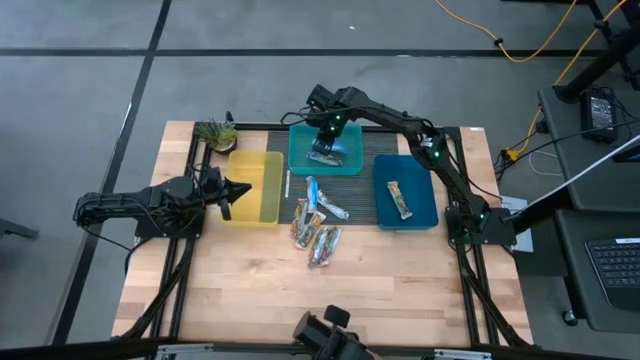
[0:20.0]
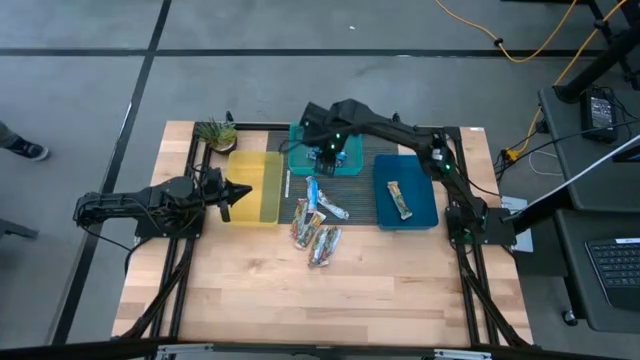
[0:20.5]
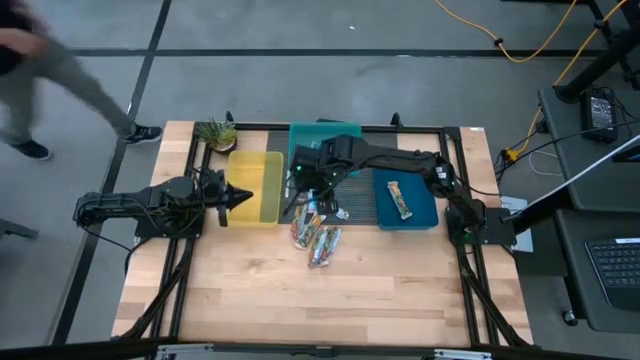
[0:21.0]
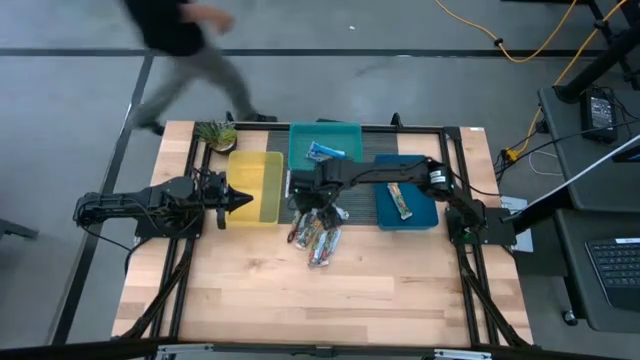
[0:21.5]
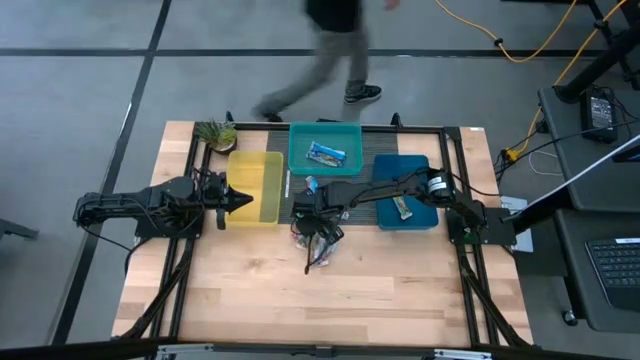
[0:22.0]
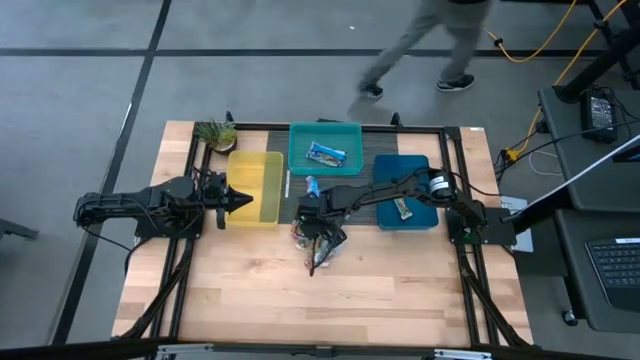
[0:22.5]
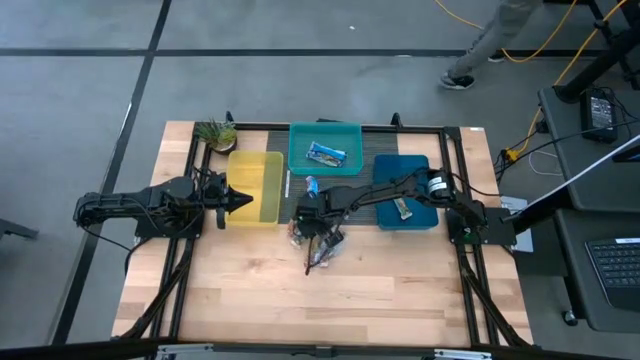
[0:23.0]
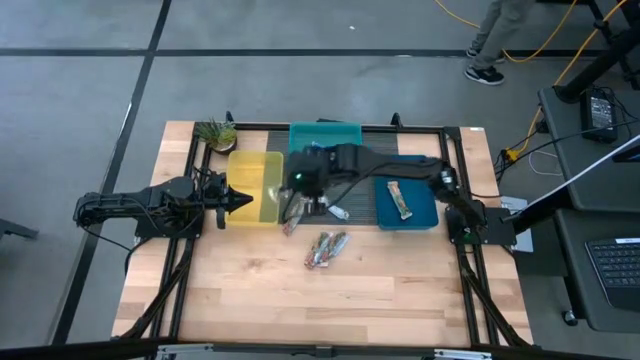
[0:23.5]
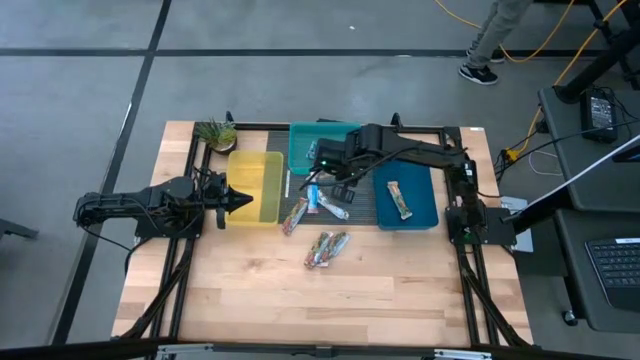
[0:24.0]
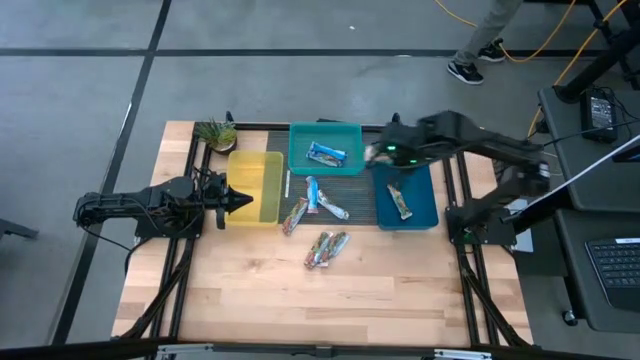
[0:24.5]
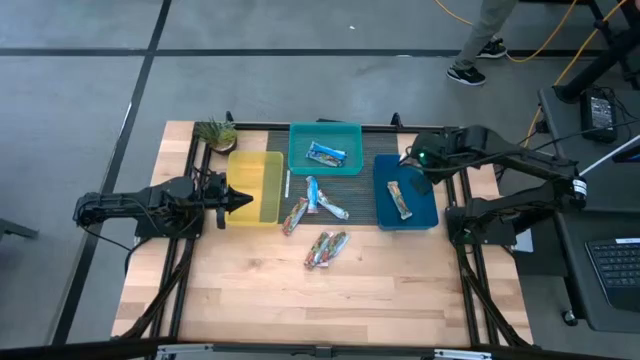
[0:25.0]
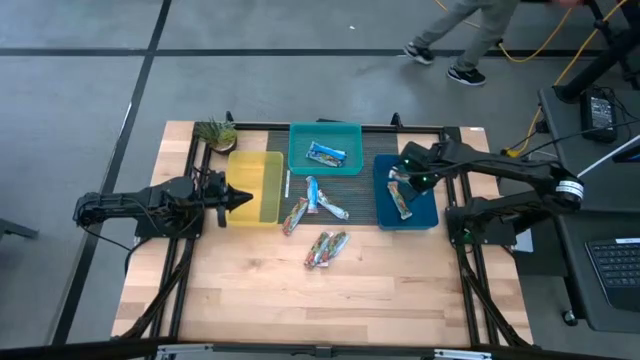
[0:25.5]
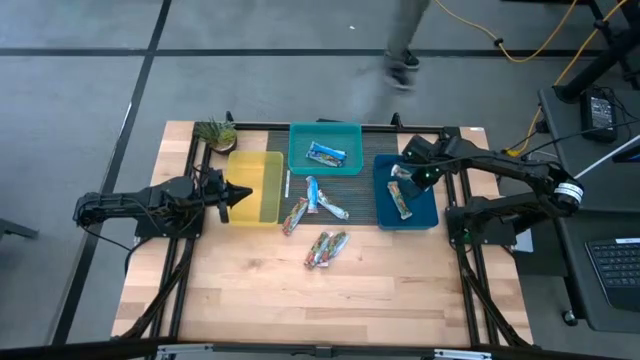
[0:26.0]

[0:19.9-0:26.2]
Task: Pick and place Granola Bars by type
Put the bottom yellow granola bar into the blue bin

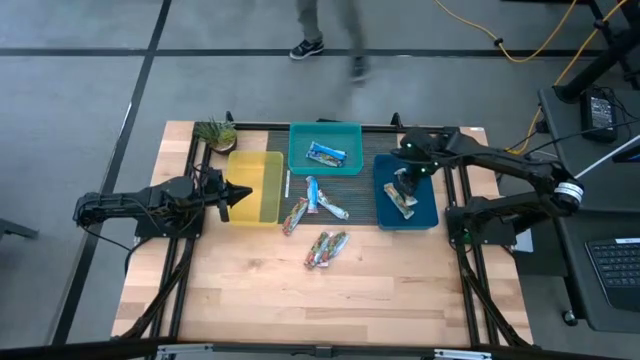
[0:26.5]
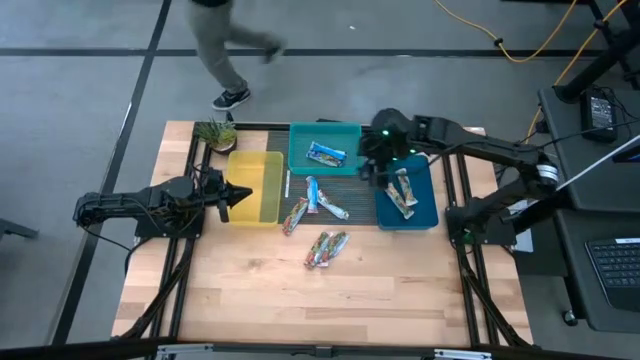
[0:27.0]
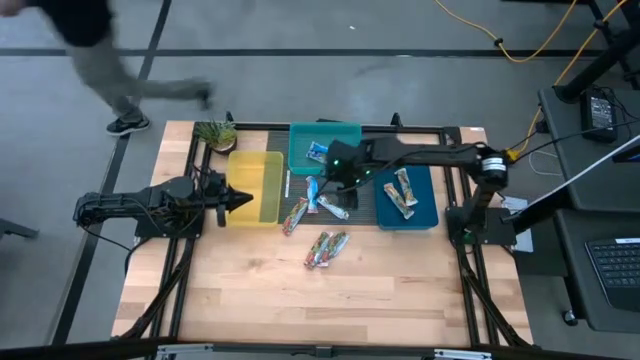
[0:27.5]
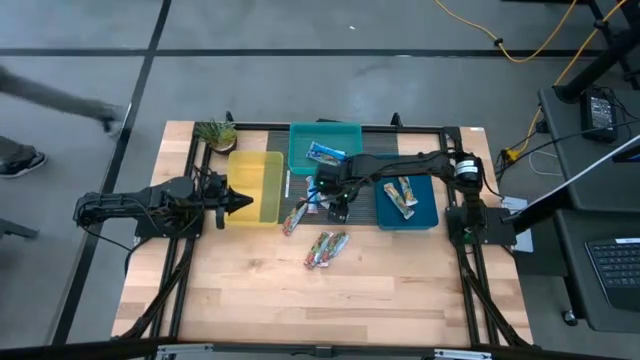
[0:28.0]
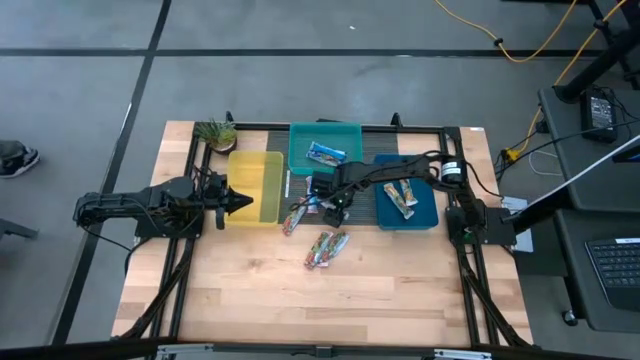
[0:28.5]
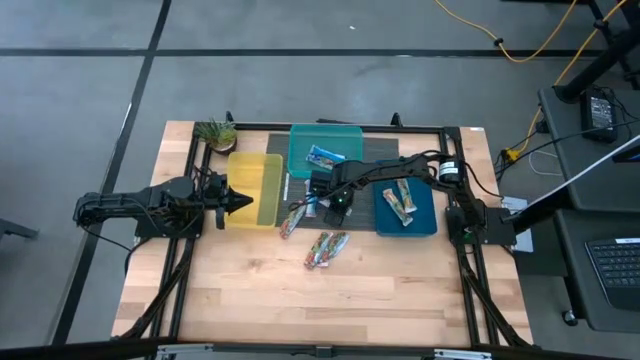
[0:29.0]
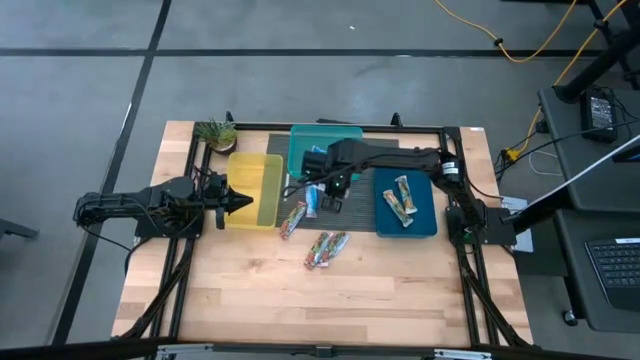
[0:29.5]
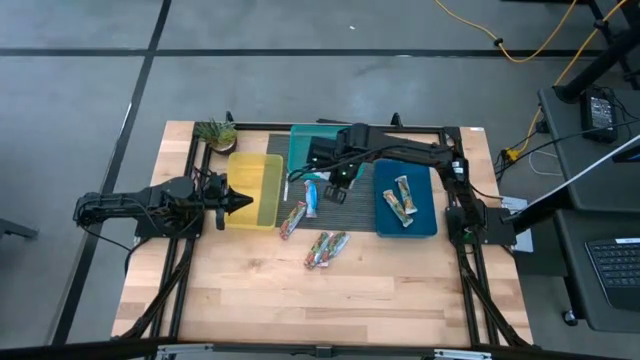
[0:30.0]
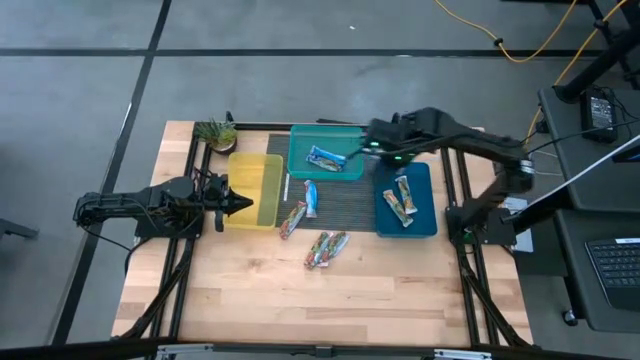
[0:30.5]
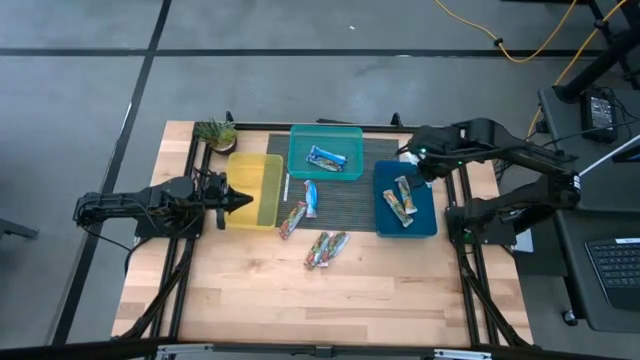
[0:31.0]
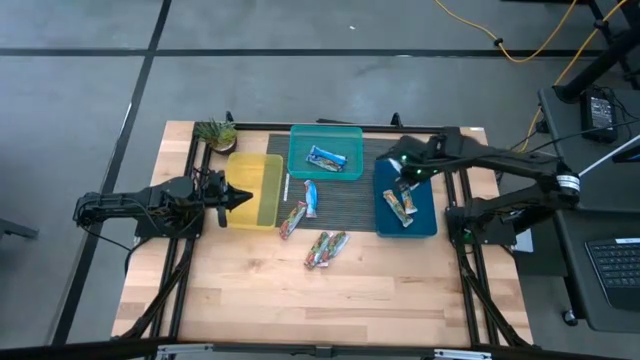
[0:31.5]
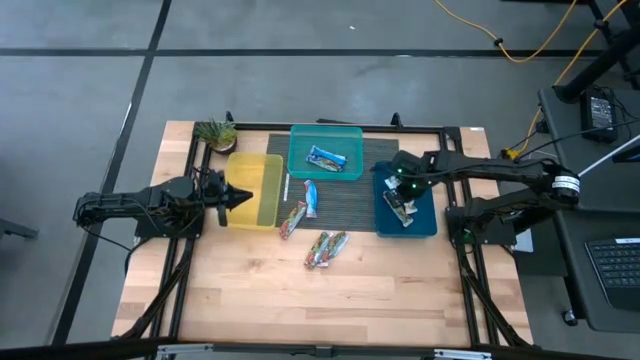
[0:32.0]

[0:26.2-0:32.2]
Put the yellow granola bar into the blue bin

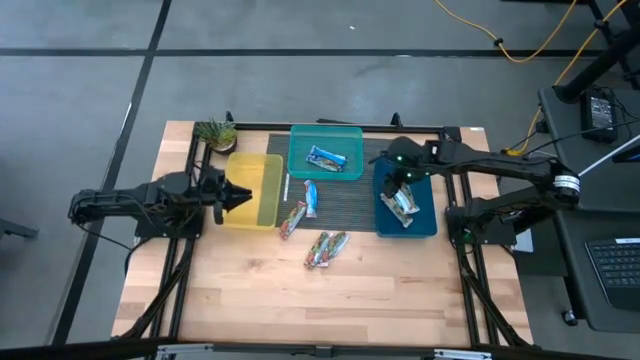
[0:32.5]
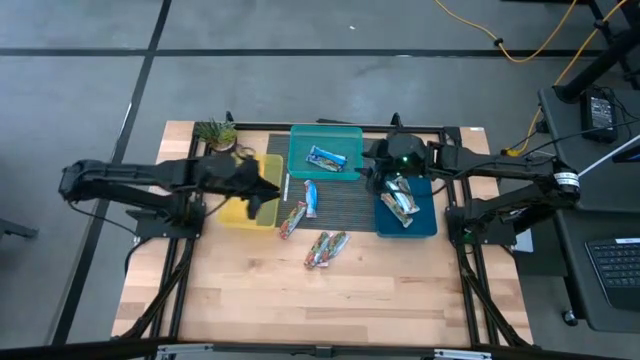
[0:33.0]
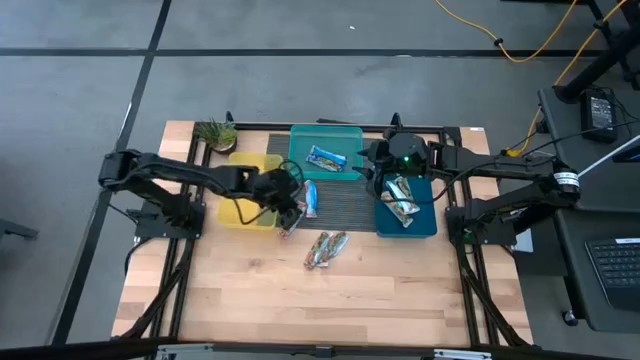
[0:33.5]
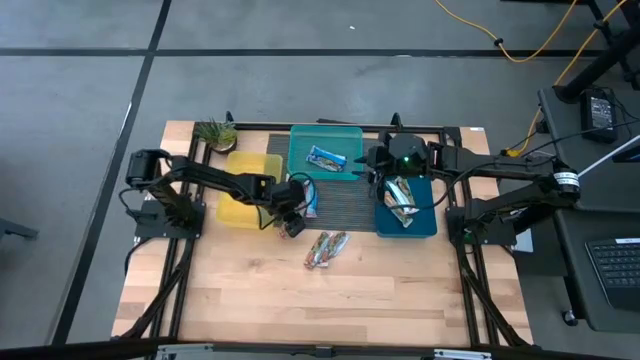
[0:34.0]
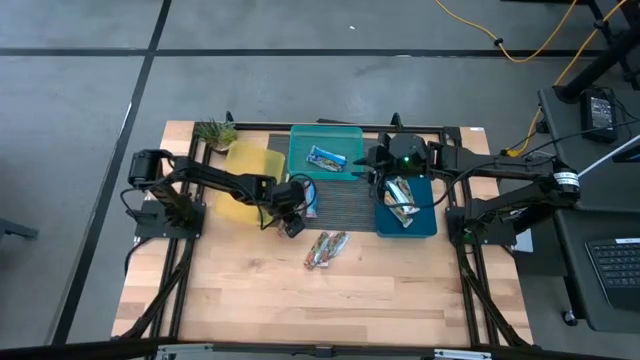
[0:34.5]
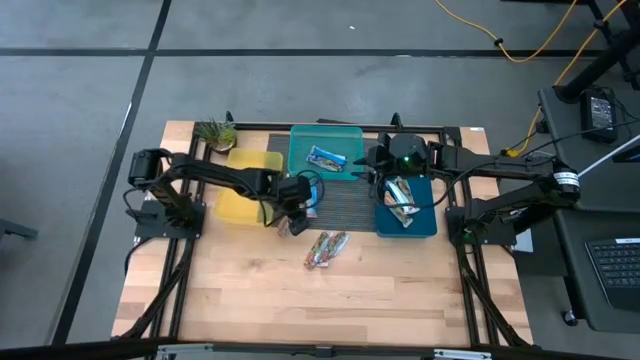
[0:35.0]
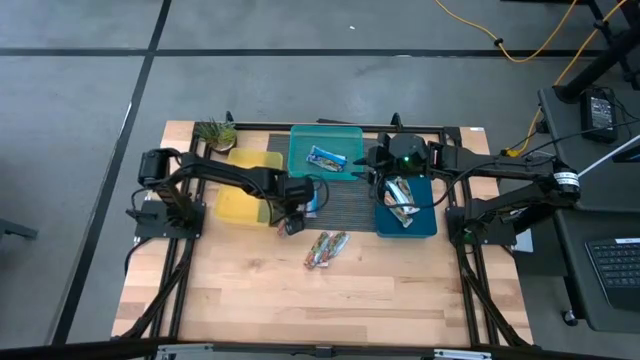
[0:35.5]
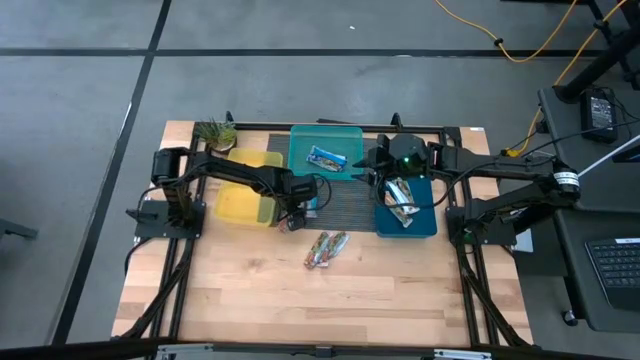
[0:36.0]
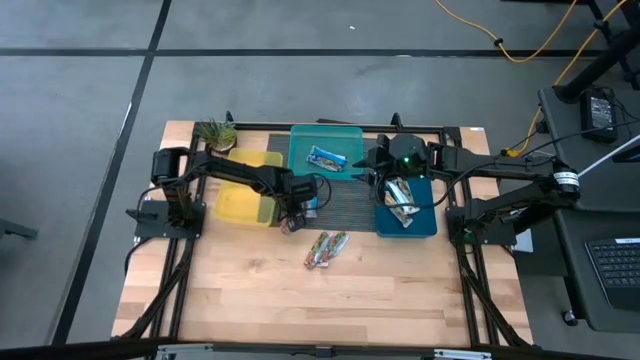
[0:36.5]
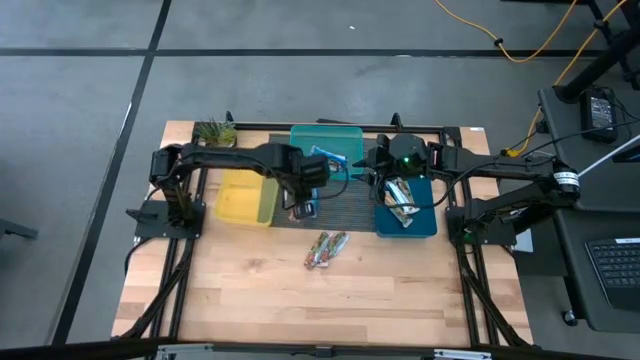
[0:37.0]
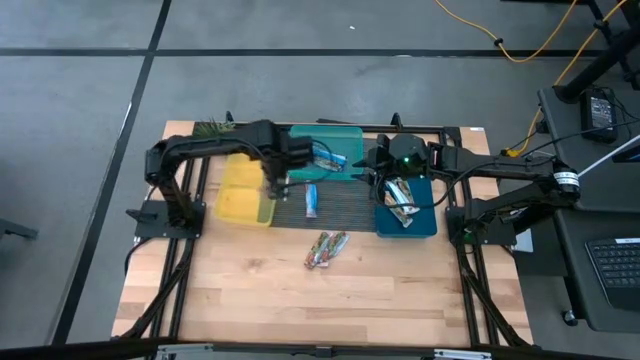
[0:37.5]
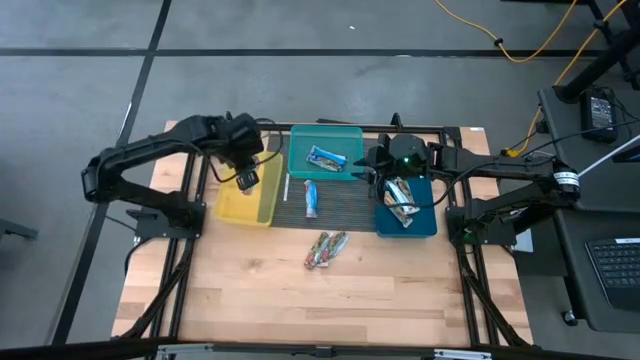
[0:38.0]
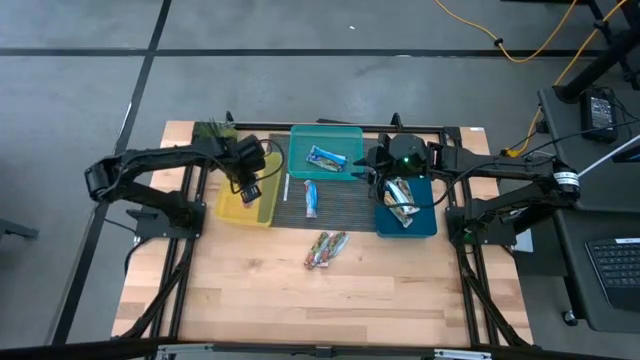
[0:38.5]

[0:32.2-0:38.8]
Put the red granola bar into the yellow bin

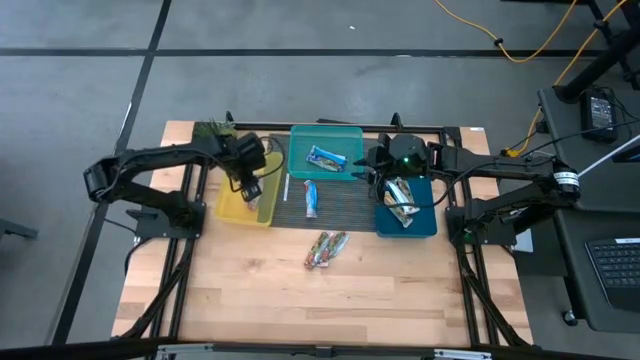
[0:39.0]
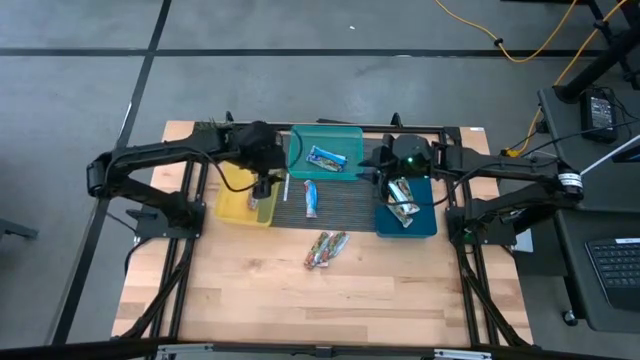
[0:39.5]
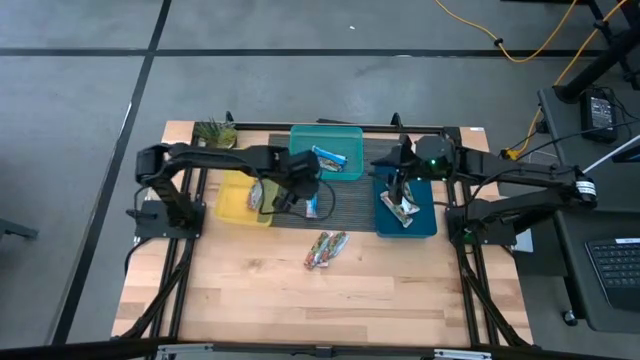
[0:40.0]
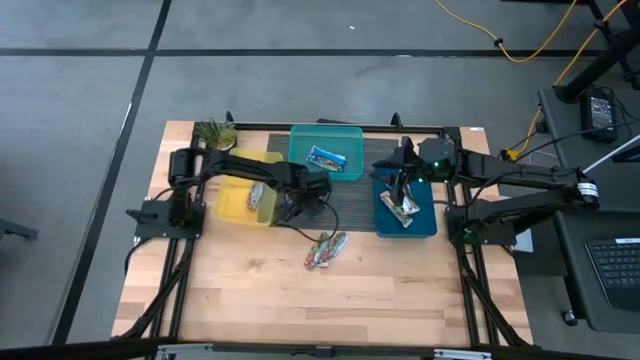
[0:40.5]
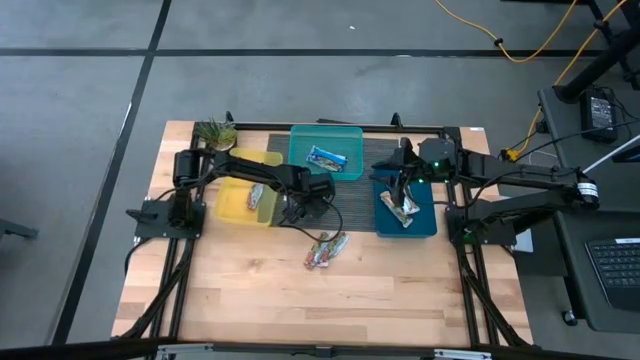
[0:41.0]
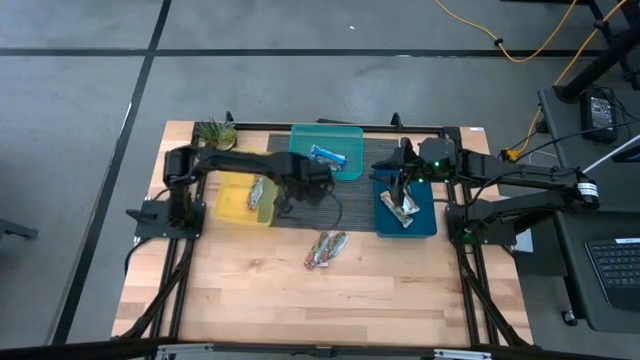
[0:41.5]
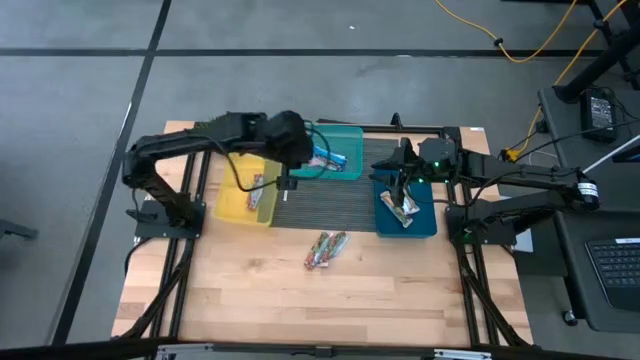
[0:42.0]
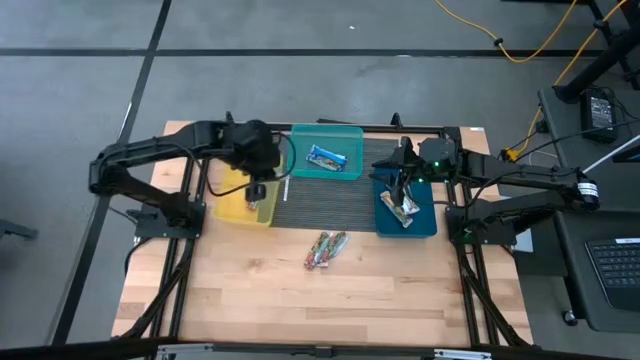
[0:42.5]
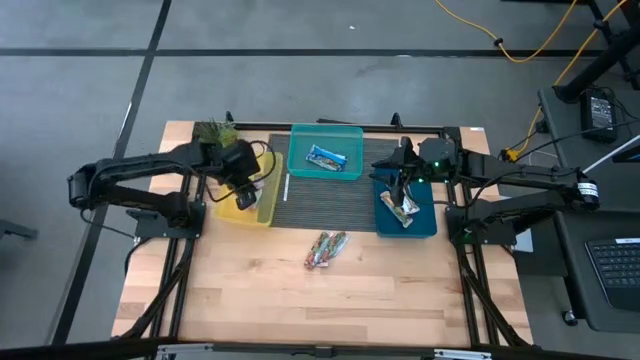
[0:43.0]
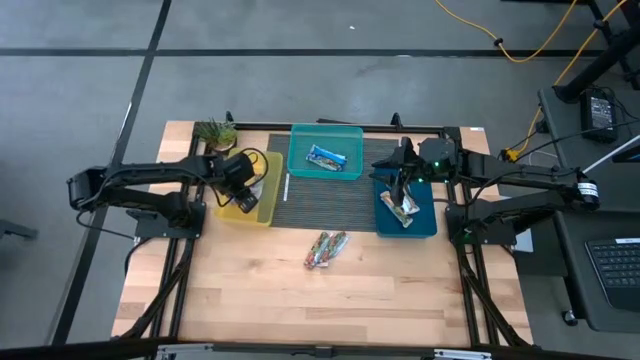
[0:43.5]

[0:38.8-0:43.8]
Put the red granola bar into the yellow bin
